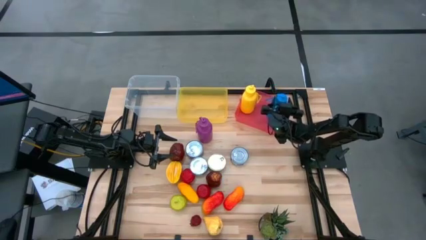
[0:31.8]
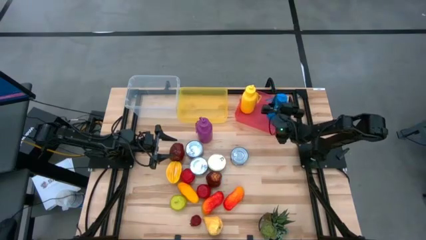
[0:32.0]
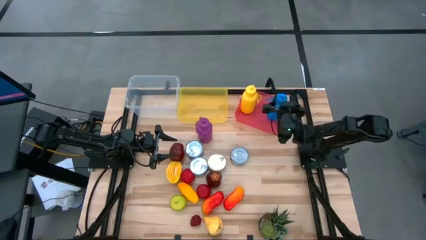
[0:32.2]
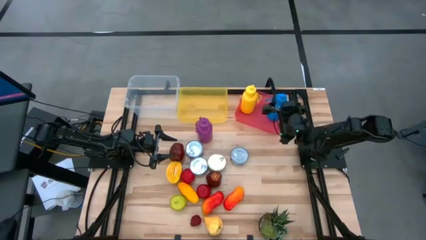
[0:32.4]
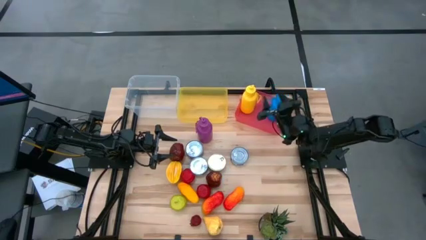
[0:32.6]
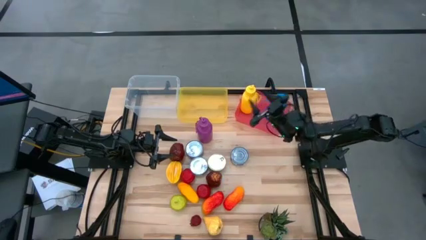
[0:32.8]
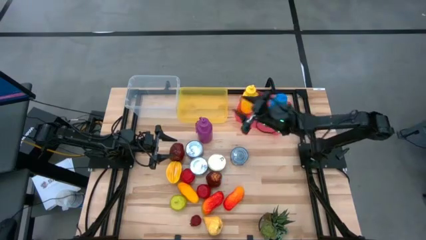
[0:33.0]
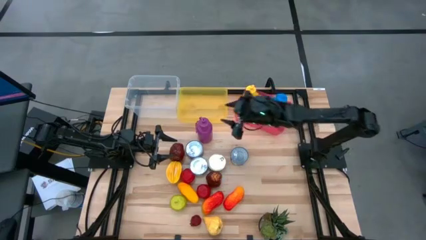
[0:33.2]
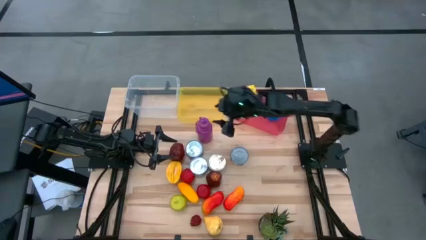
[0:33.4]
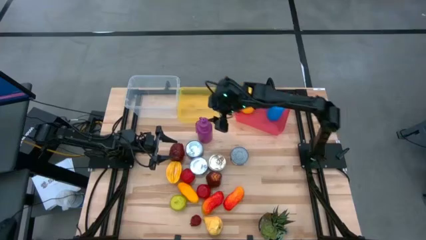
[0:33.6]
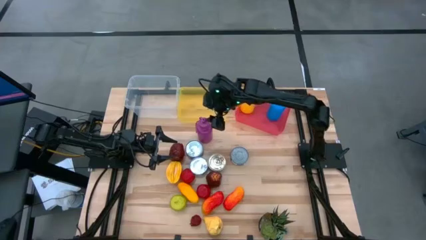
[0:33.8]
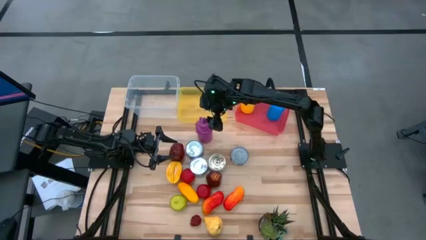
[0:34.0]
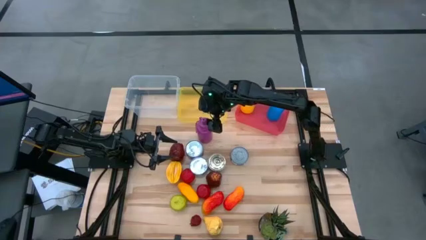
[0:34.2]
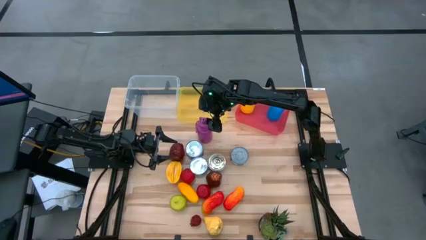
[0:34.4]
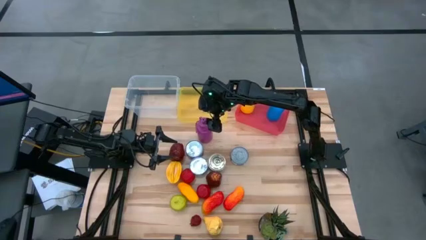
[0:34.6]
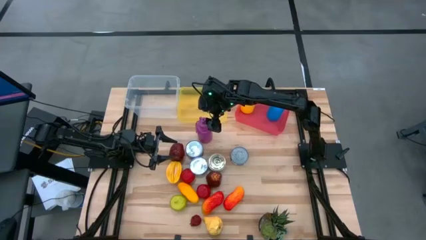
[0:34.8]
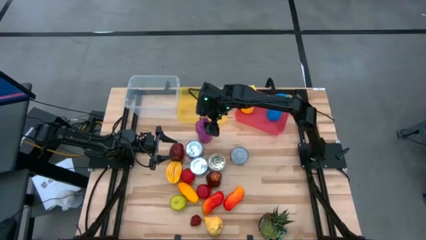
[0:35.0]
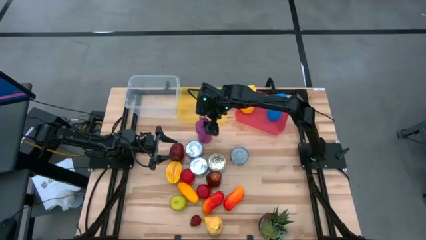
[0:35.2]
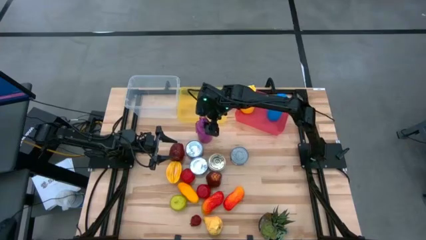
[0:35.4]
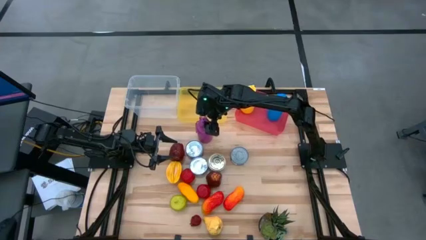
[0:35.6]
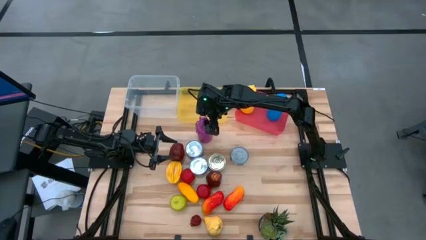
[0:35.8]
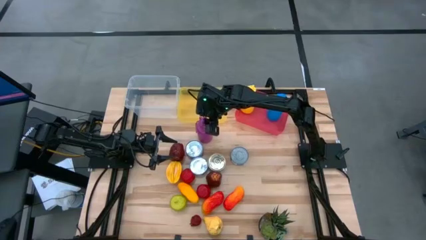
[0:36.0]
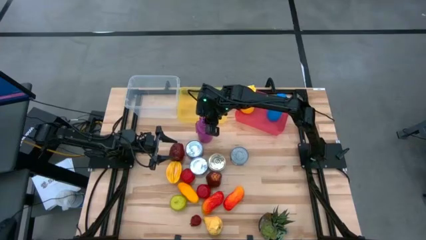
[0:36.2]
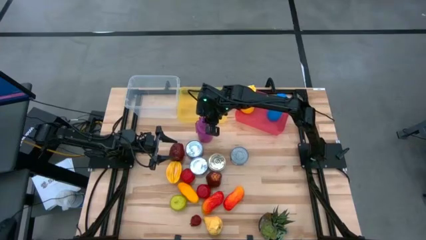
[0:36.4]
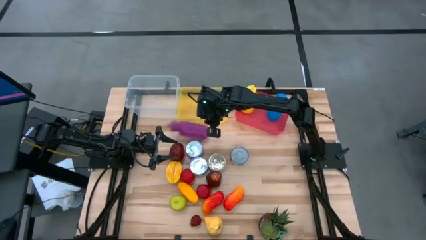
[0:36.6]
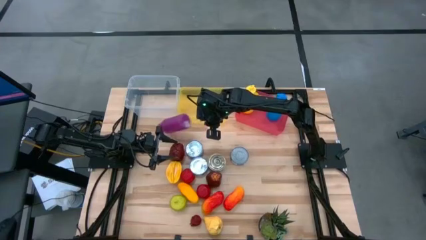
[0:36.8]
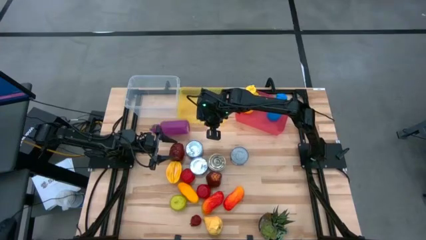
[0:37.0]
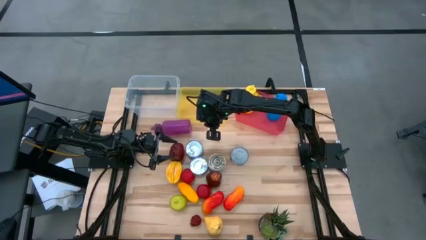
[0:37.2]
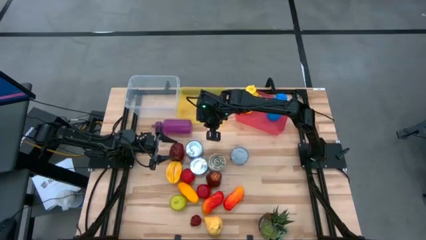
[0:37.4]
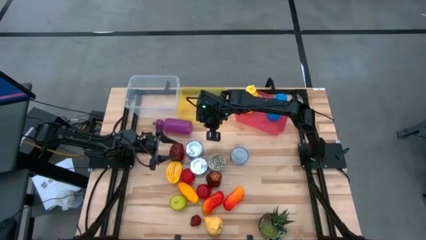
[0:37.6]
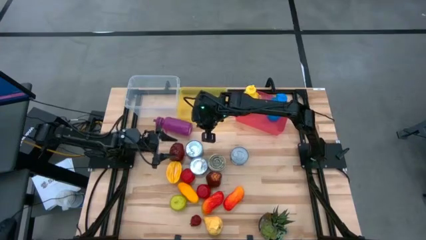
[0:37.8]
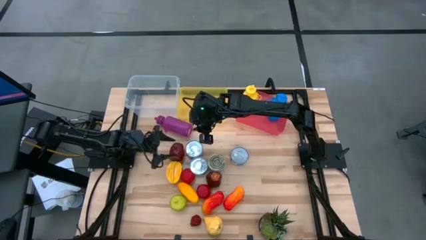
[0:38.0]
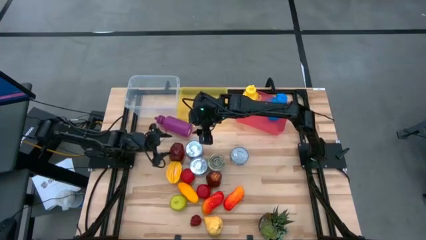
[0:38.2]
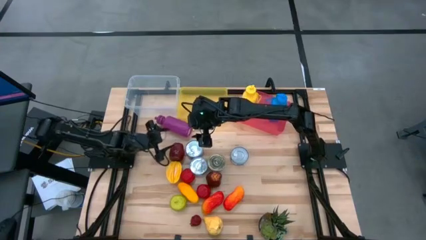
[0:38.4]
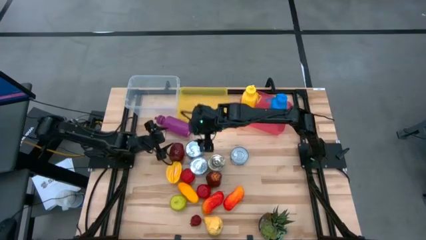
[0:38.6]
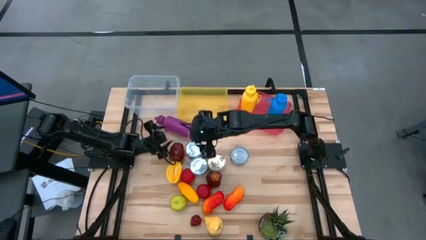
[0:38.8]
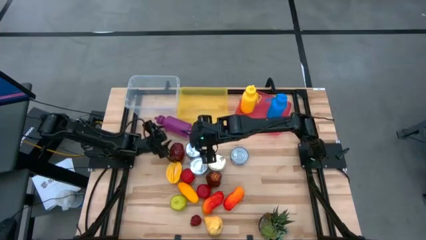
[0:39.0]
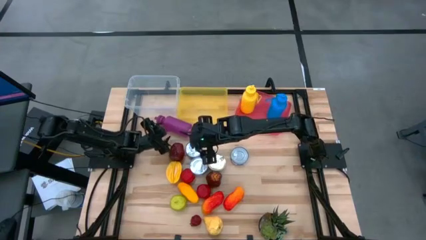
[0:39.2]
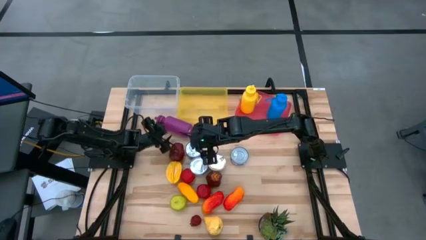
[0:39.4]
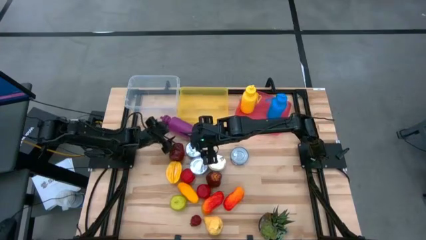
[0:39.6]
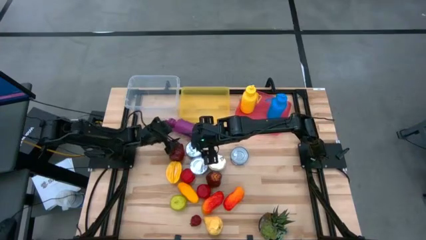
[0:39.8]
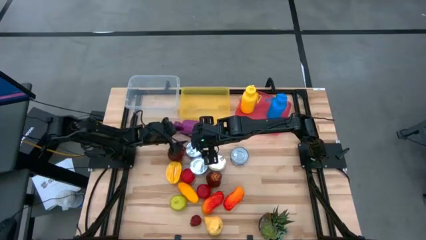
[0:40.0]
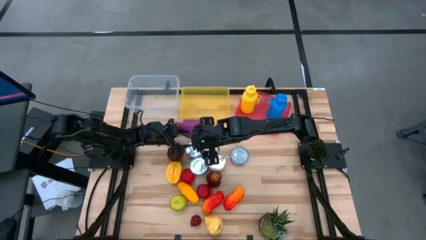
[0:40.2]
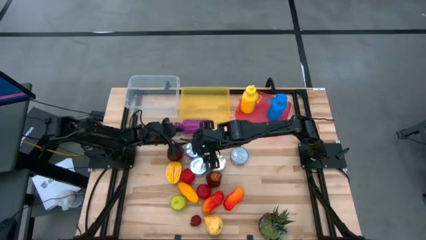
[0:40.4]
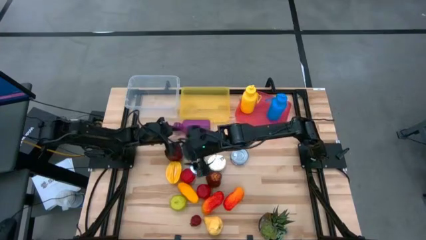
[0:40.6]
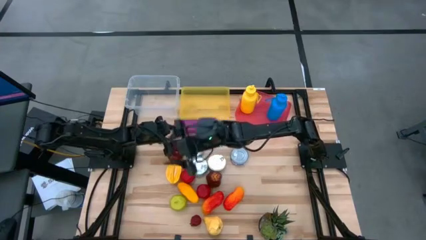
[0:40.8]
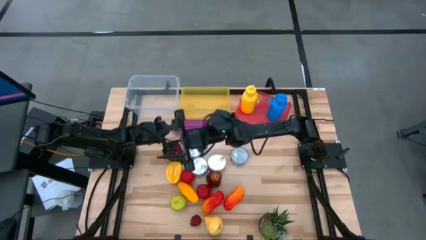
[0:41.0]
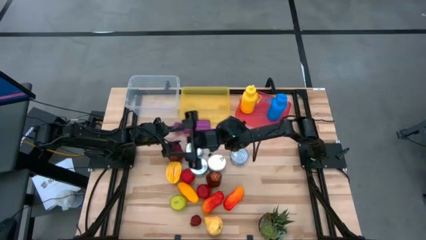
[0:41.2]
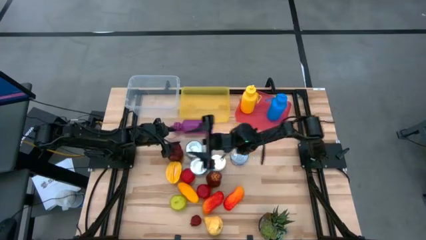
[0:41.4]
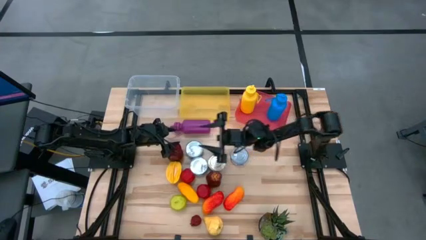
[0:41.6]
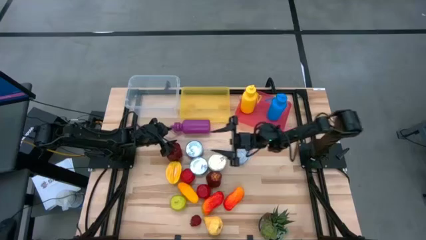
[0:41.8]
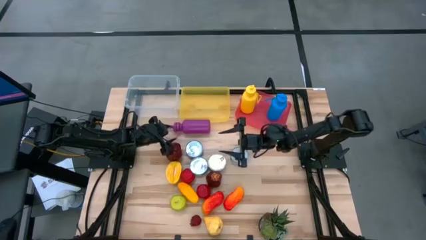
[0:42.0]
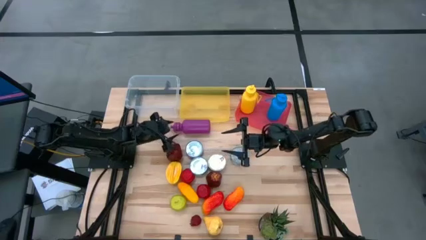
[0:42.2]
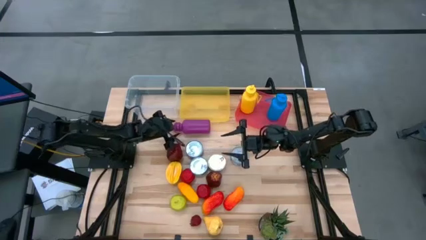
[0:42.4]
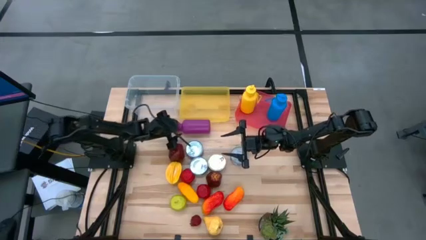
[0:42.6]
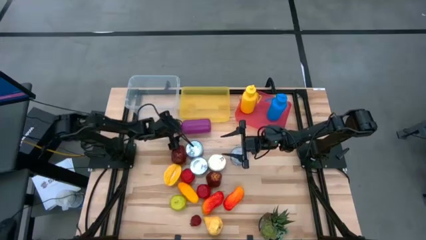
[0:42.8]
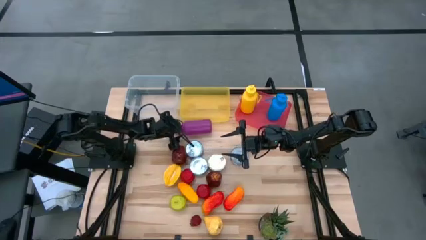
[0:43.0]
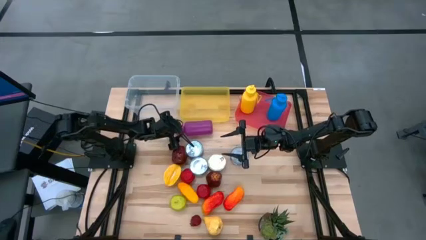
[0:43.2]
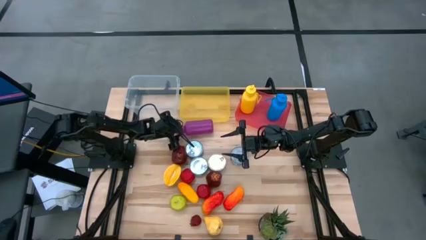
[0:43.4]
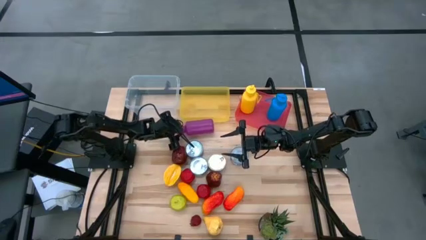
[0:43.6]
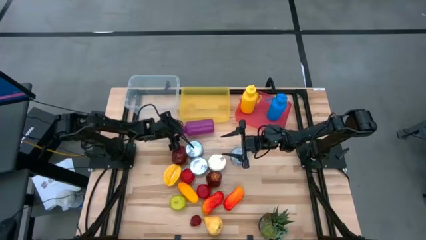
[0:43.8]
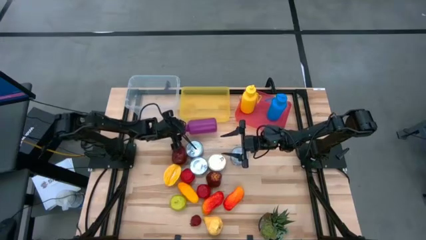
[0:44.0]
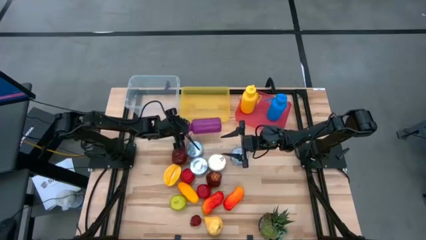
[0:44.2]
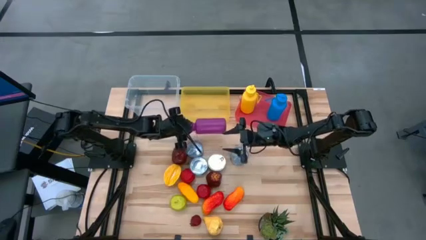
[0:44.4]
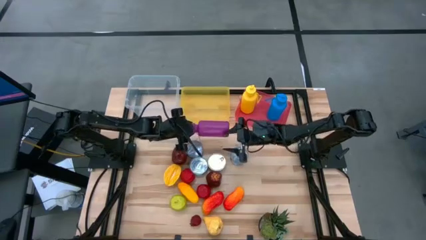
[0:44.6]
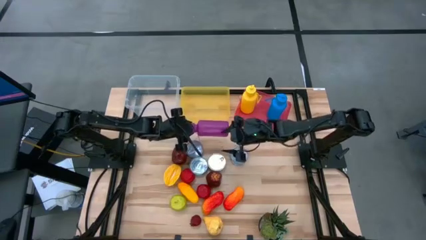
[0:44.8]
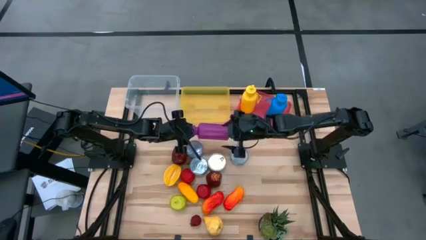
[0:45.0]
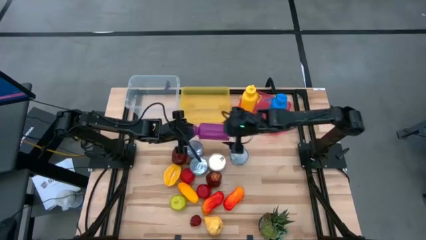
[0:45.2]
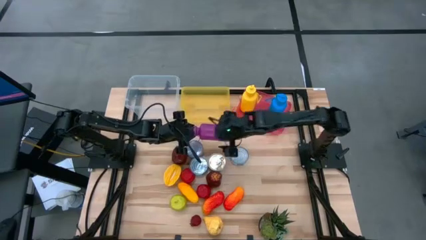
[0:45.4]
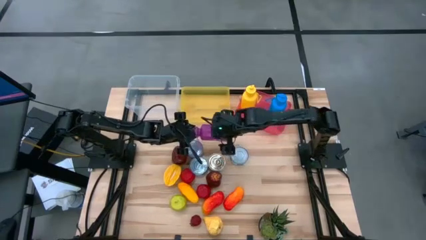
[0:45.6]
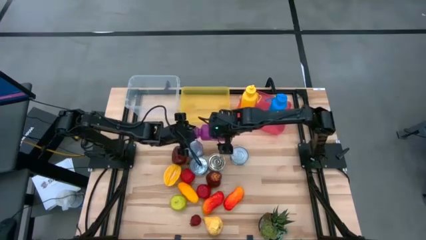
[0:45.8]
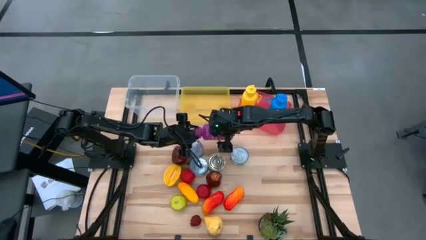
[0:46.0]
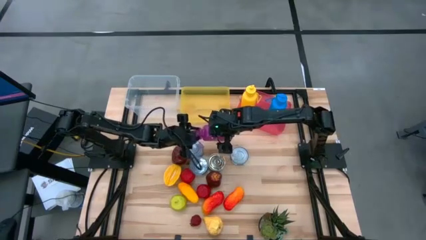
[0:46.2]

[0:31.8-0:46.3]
Task: Pick & Place Food Item
Put the purple water bottle into the pink bin

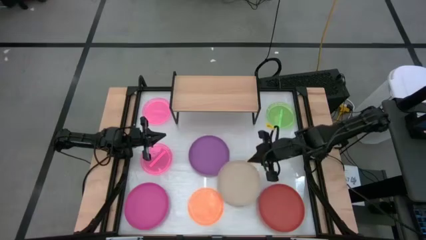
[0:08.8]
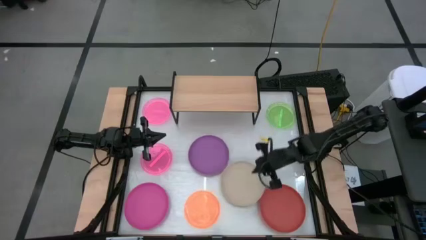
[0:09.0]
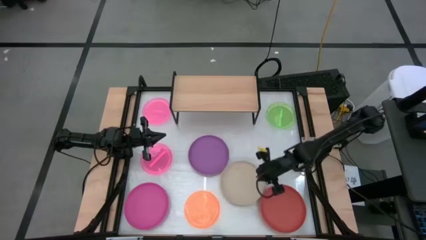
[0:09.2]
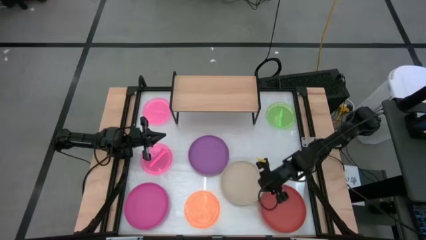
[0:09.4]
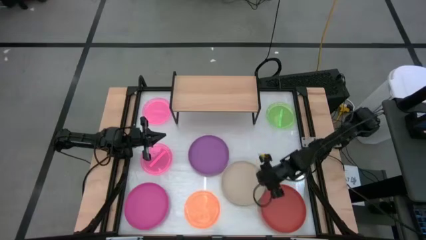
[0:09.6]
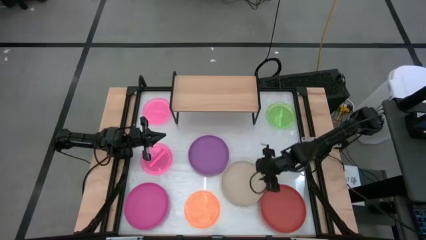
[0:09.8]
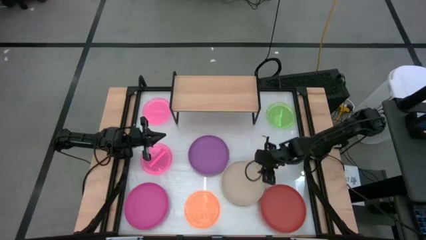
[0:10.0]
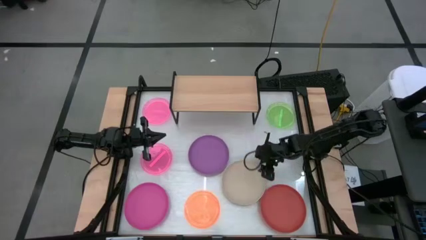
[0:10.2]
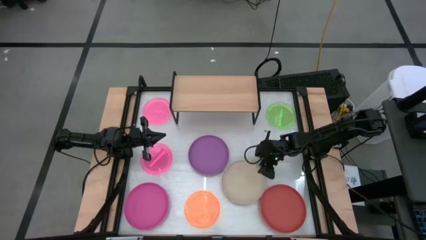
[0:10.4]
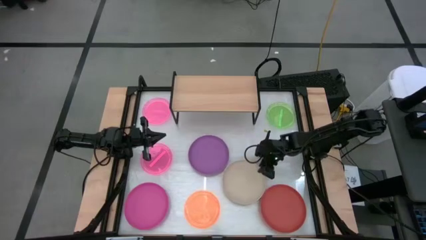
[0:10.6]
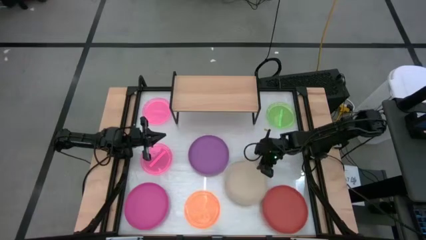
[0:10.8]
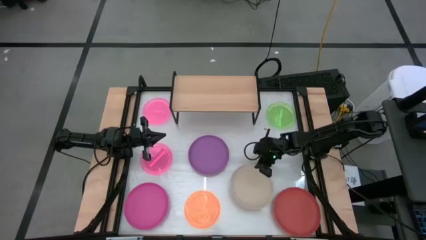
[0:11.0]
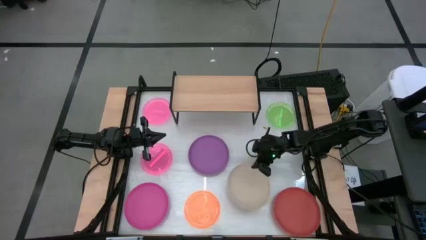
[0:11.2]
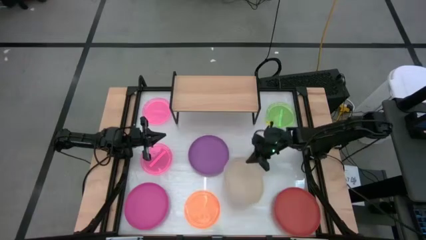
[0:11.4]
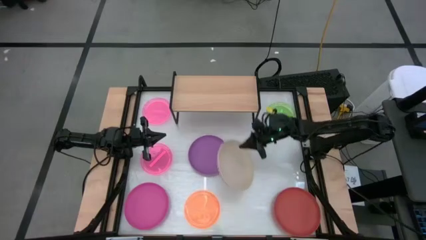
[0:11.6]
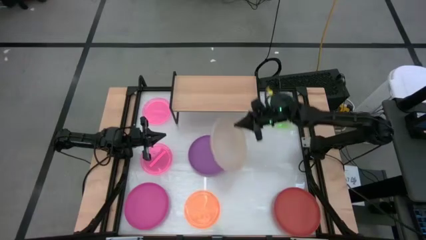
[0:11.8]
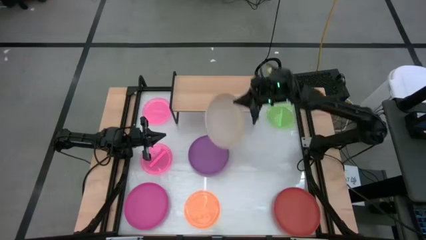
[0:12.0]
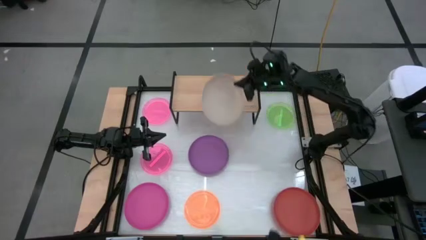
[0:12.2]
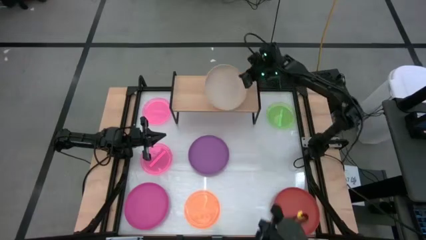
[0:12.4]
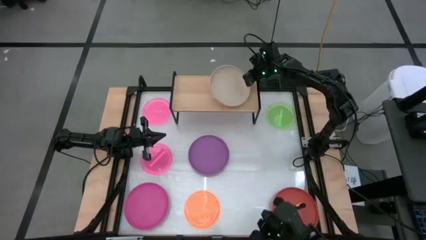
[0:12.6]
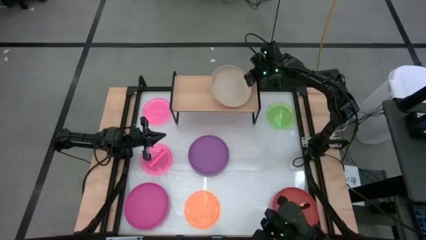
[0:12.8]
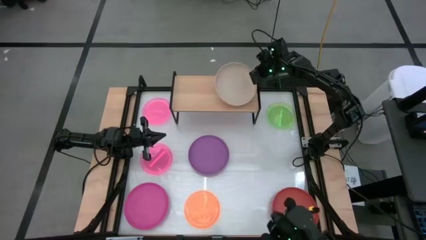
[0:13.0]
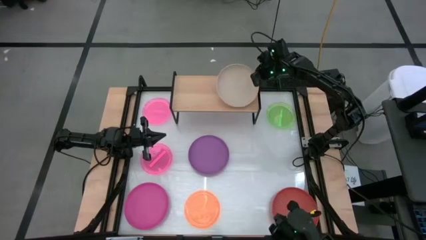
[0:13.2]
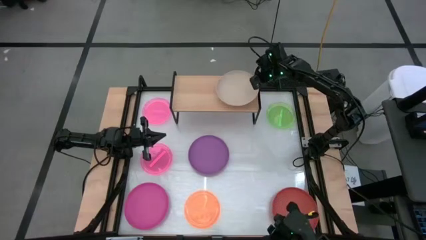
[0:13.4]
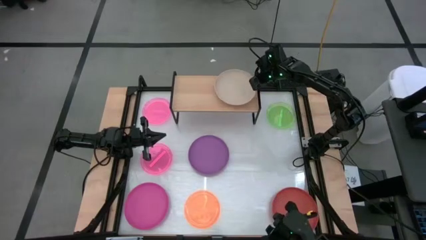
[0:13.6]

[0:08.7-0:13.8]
Task: Place and stack plates onto a shelf
Put the brown plate on the shelf
